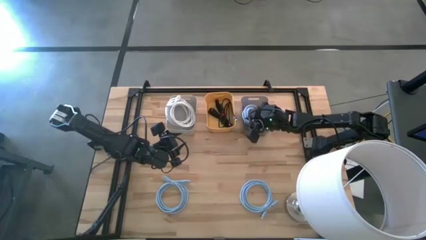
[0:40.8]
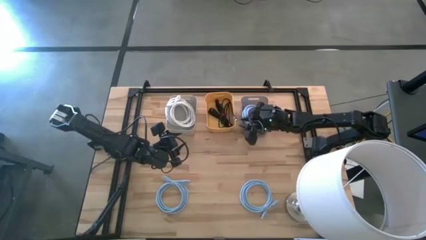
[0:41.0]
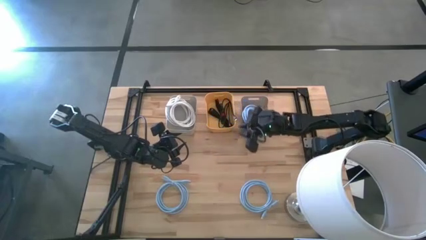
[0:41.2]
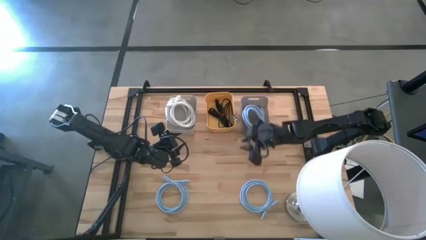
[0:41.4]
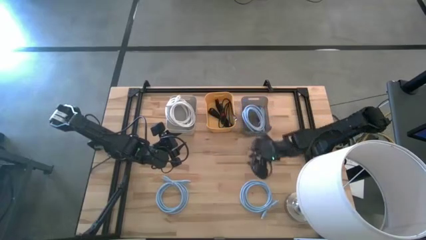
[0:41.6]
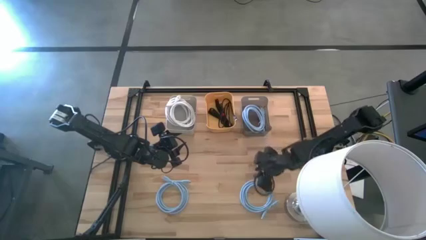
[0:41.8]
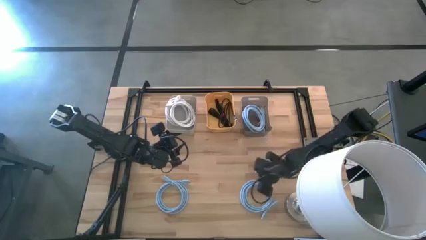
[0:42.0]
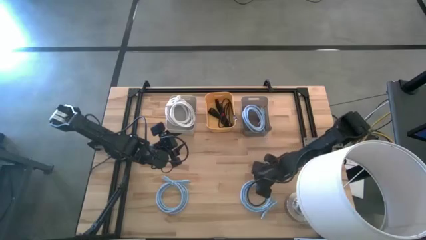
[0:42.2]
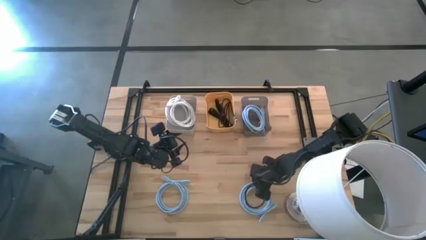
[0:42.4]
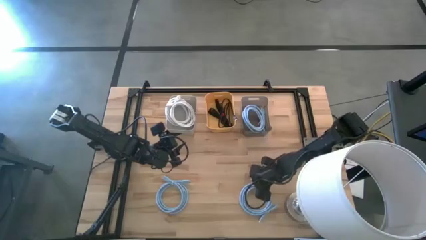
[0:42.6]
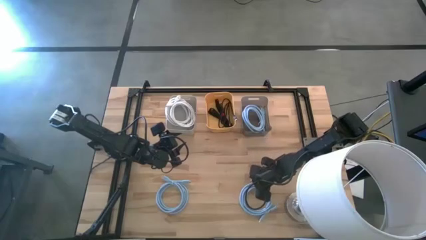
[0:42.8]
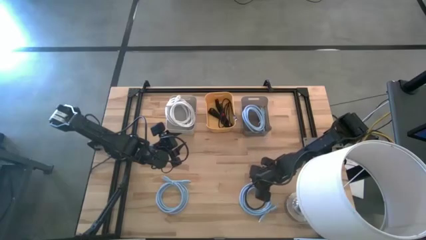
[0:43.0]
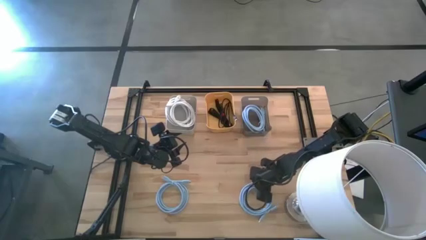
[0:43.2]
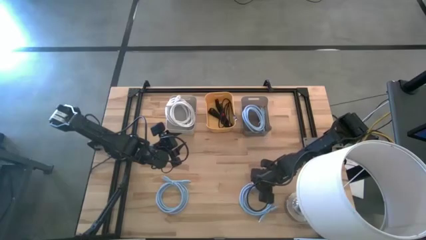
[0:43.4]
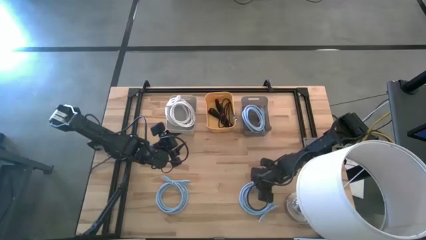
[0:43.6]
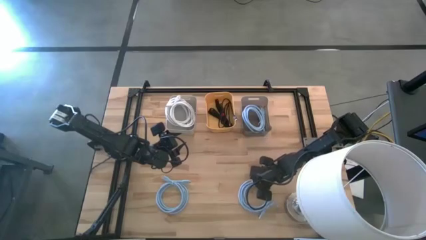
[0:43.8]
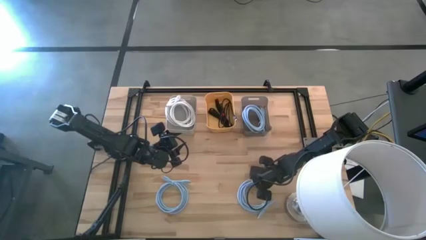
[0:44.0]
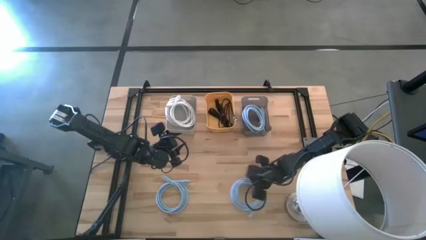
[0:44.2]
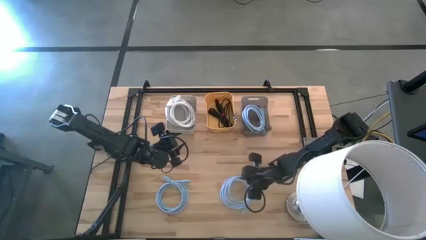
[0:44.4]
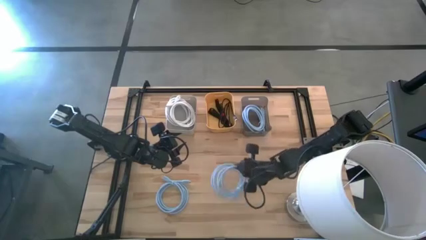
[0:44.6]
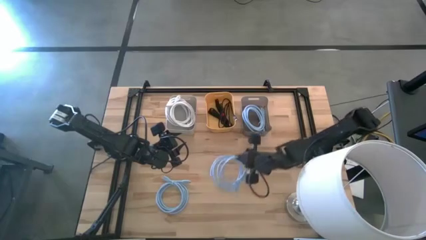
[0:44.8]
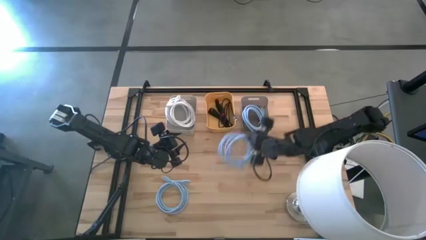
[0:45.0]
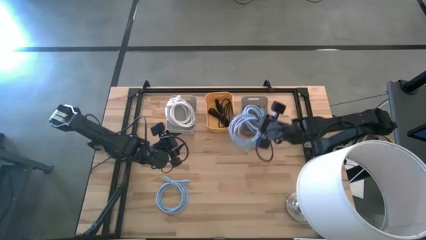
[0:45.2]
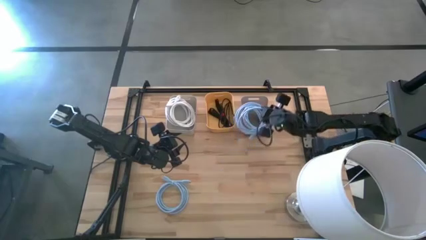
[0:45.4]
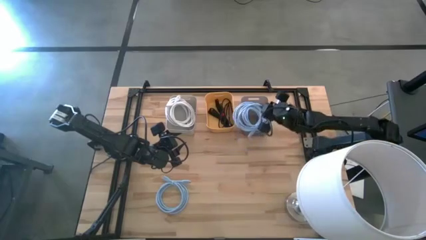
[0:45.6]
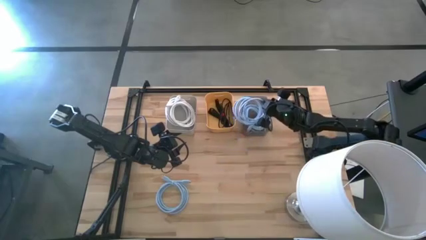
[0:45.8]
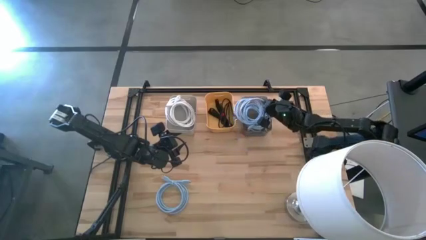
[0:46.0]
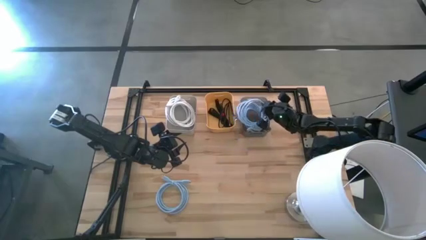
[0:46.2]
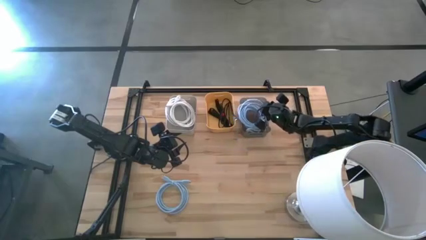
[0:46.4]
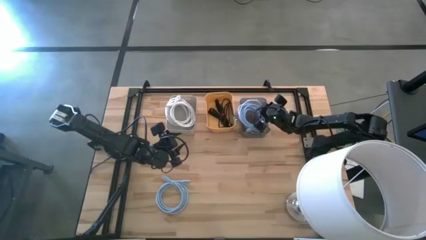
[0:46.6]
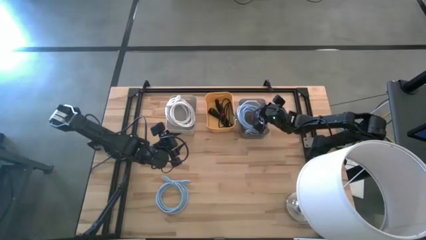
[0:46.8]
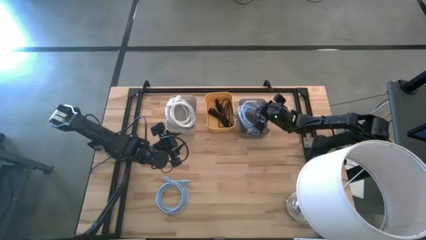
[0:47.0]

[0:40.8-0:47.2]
Task: Sort HDMI cables
Put the right blue HDMI cable into the gray bin

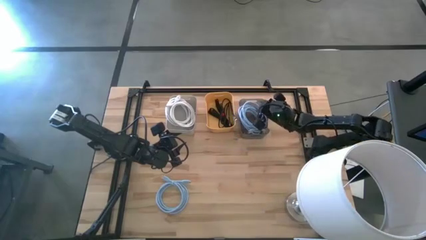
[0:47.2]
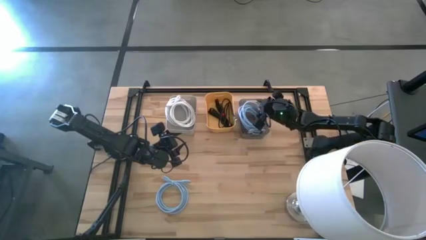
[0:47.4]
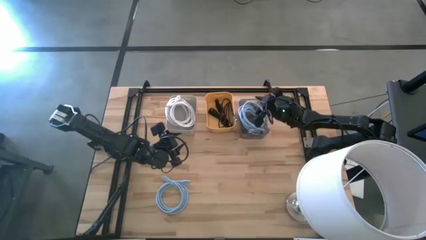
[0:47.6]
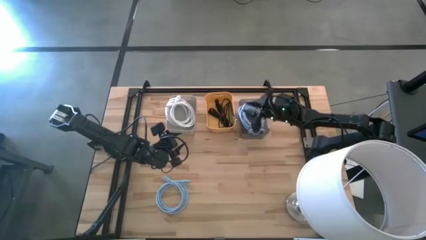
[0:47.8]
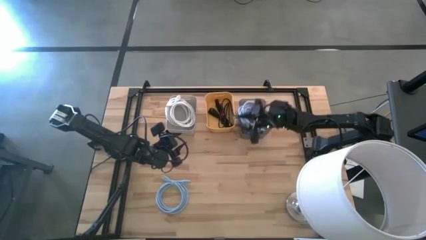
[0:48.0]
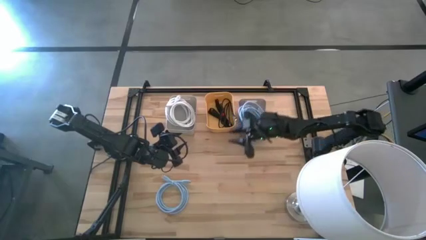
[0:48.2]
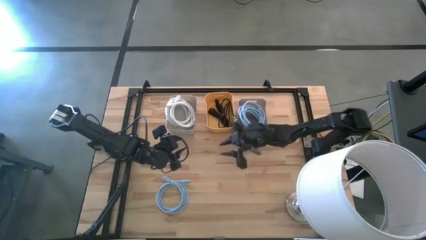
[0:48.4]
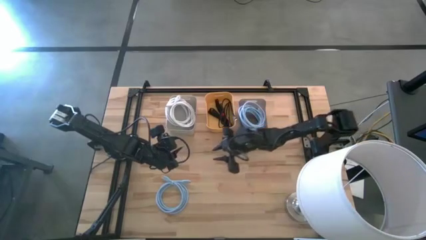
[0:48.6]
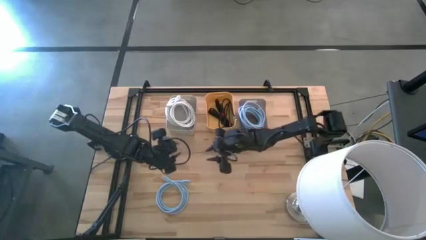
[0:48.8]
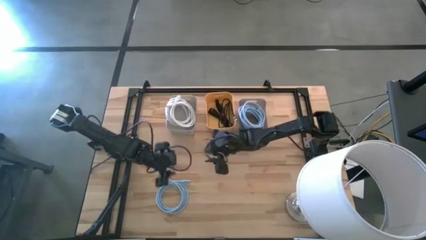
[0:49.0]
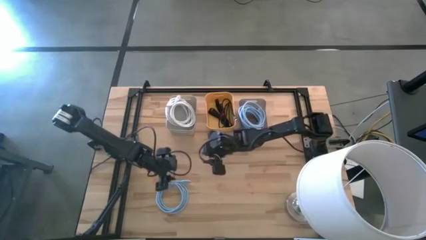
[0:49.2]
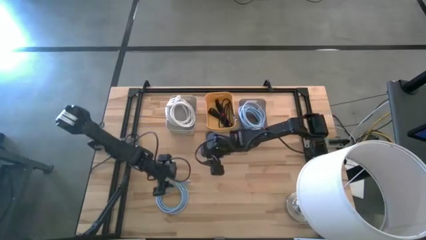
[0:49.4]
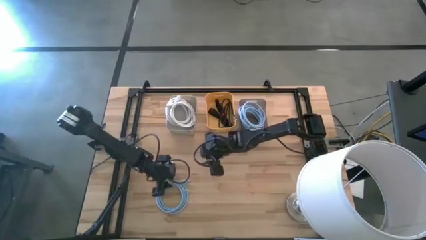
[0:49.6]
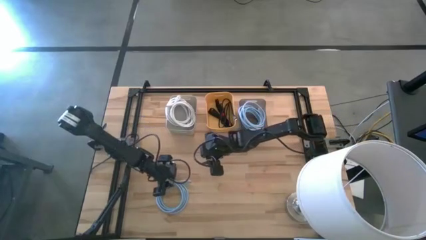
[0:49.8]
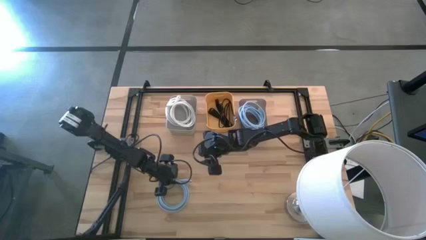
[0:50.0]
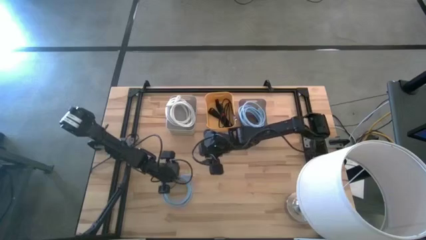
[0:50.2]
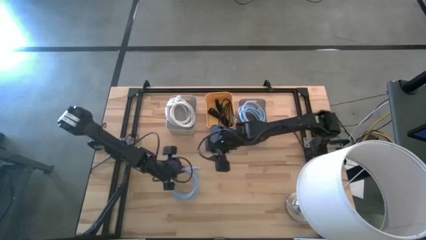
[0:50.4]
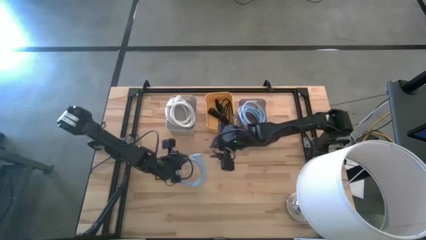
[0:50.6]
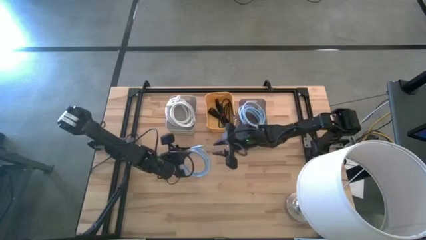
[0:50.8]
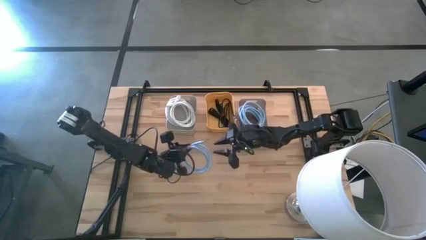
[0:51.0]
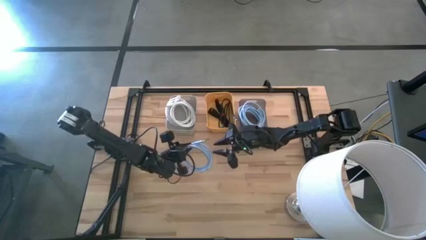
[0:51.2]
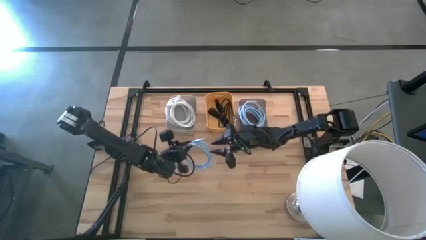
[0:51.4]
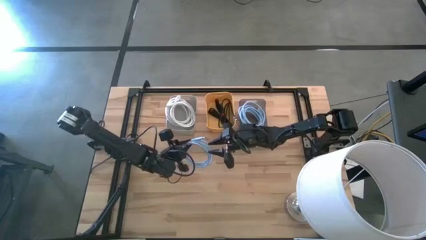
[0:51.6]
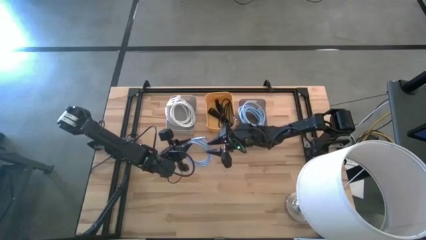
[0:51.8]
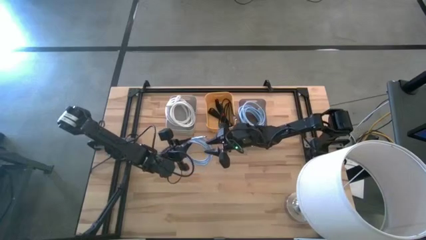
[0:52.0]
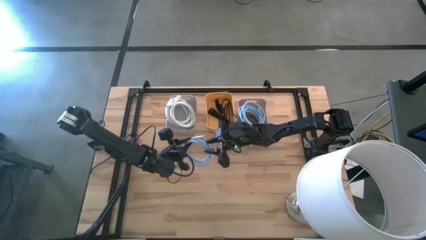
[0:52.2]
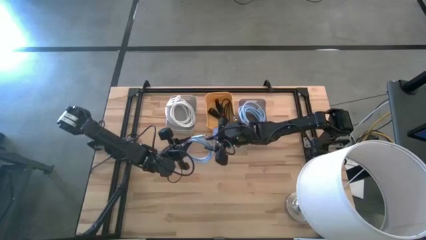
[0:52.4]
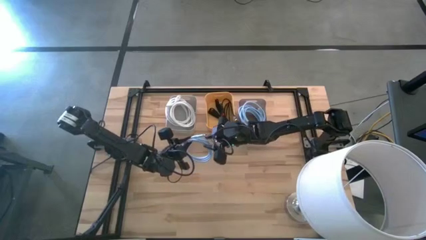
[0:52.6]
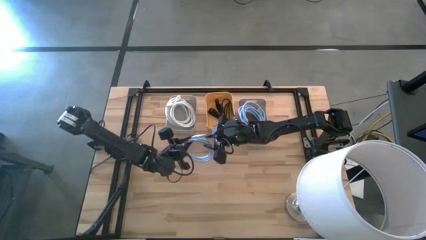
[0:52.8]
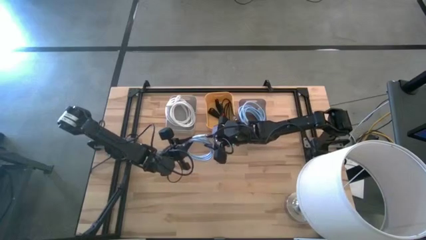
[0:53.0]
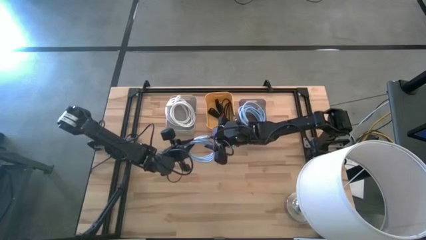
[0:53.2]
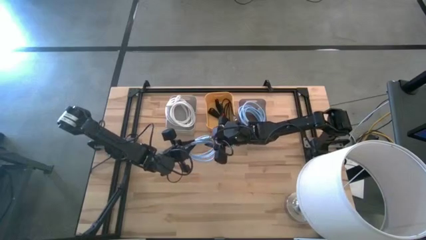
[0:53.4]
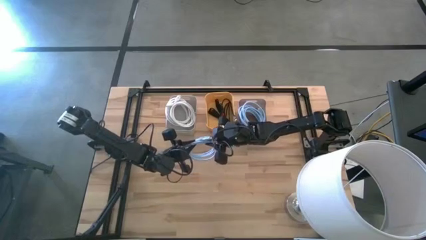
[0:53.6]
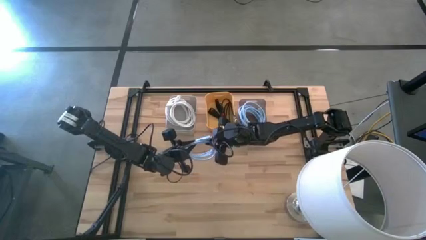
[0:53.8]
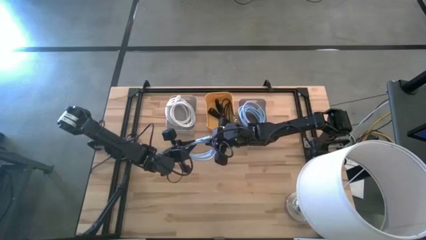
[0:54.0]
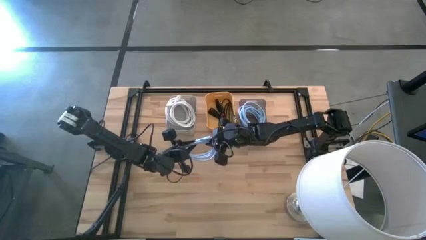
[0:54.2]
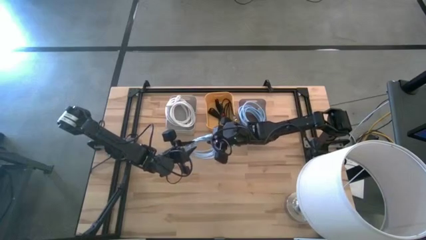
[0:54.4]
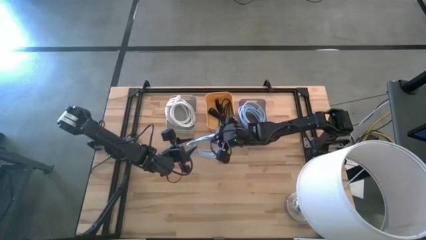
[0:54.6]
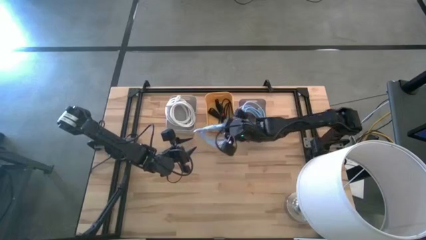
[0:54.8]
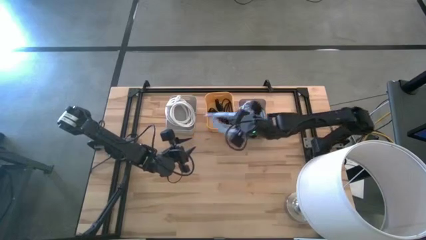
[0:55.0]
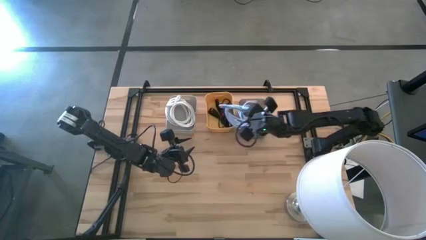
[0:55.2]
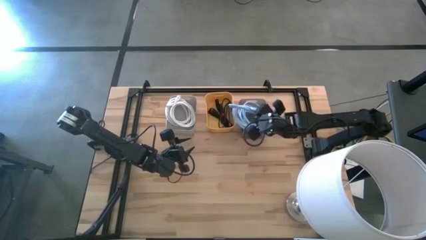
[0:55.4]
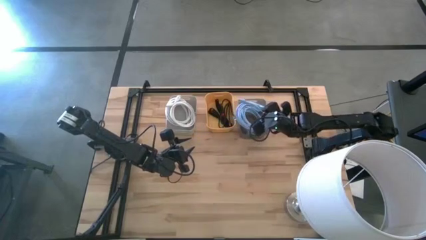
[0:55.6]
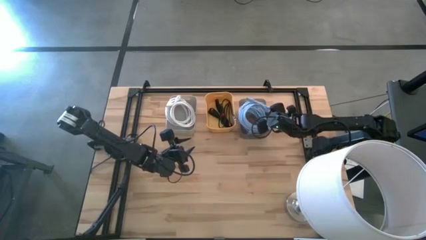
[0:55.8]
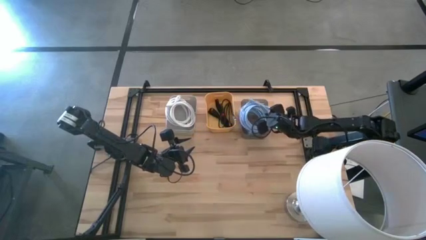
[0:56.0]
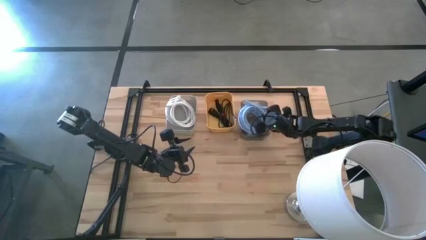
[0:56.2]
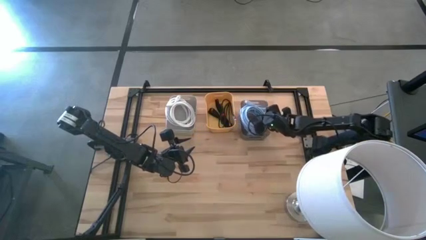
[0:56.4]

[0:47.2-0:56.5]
Put the blue HDMI cable into the gray bin
